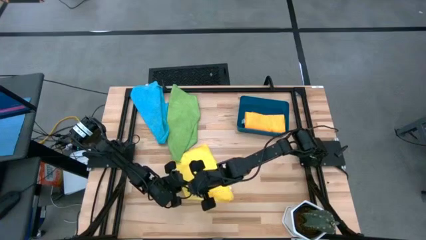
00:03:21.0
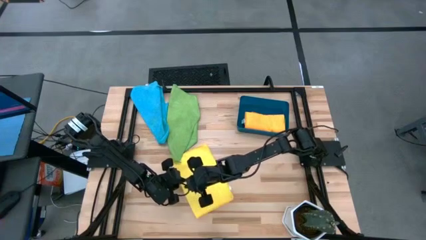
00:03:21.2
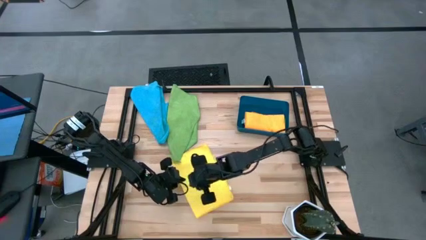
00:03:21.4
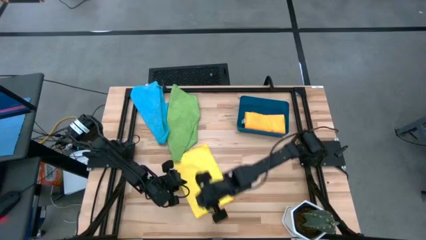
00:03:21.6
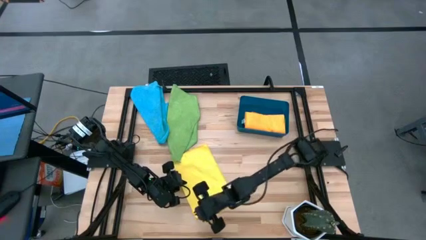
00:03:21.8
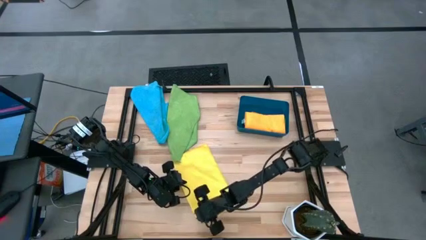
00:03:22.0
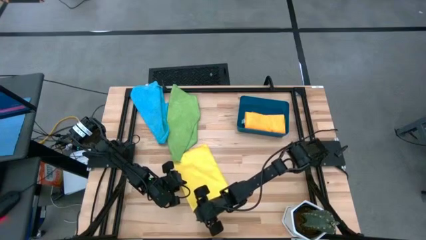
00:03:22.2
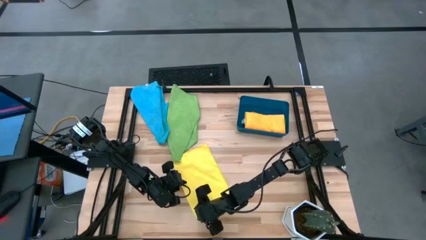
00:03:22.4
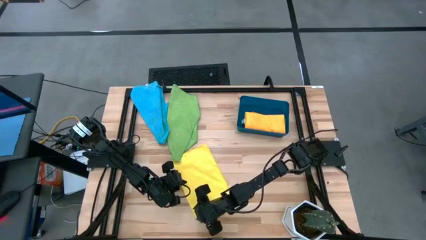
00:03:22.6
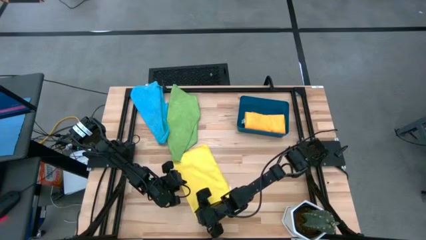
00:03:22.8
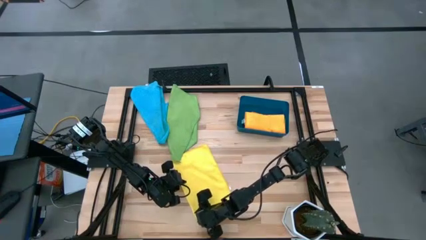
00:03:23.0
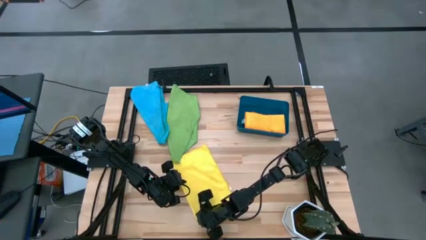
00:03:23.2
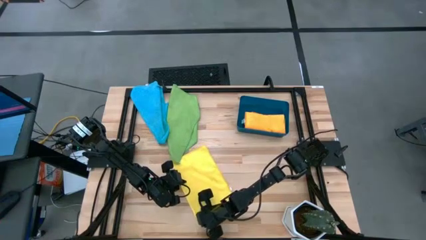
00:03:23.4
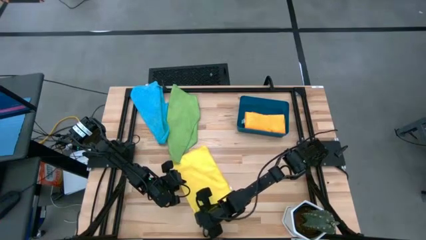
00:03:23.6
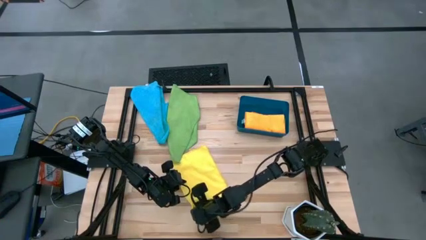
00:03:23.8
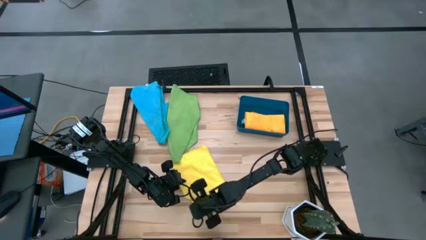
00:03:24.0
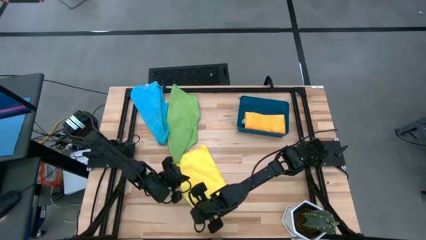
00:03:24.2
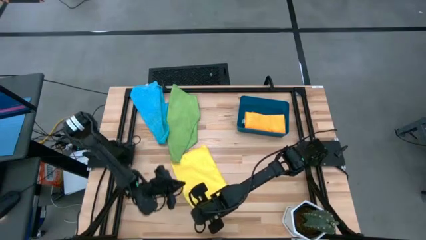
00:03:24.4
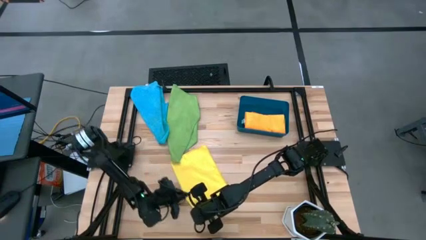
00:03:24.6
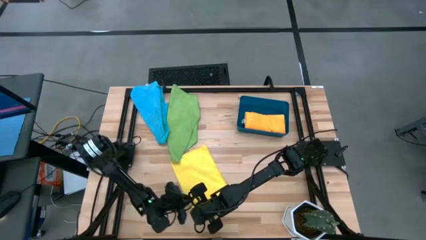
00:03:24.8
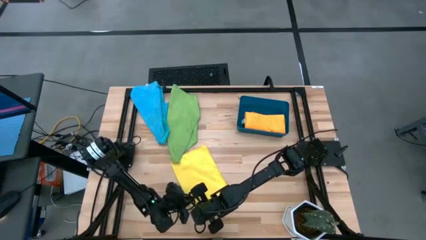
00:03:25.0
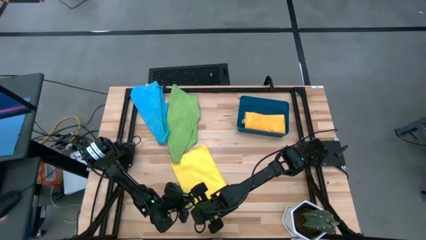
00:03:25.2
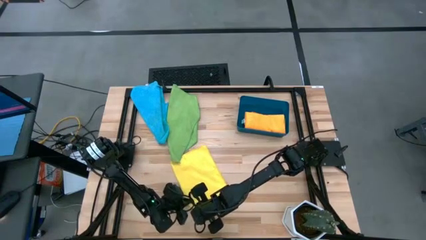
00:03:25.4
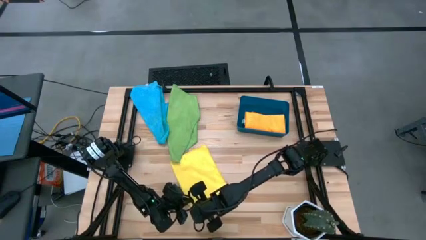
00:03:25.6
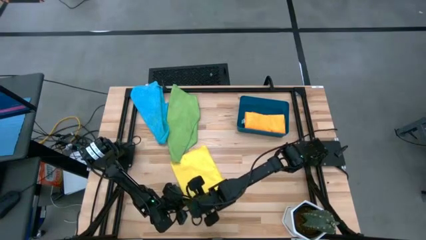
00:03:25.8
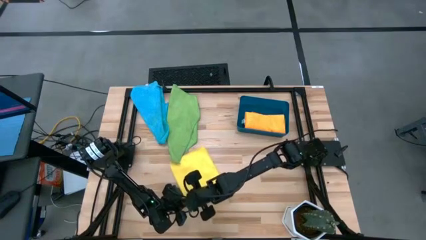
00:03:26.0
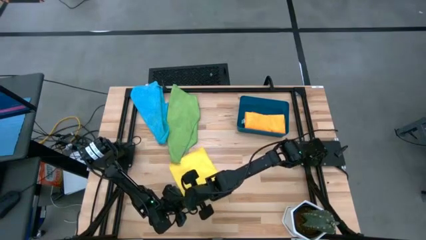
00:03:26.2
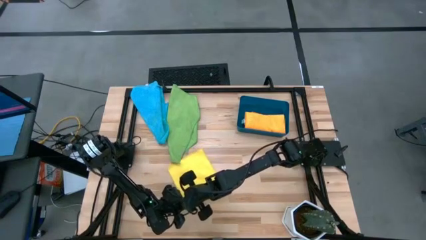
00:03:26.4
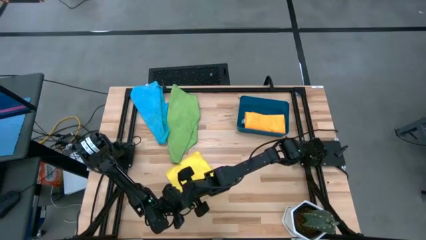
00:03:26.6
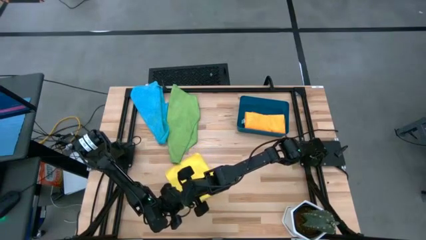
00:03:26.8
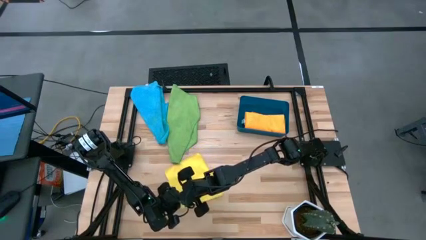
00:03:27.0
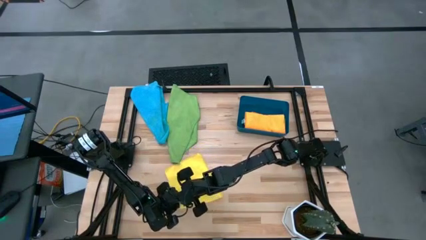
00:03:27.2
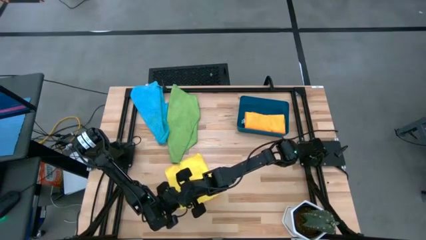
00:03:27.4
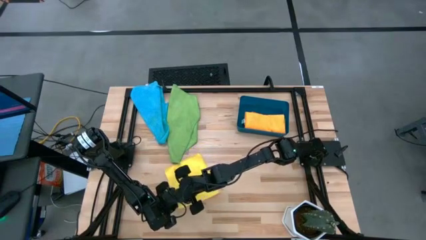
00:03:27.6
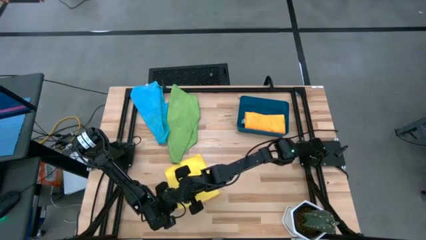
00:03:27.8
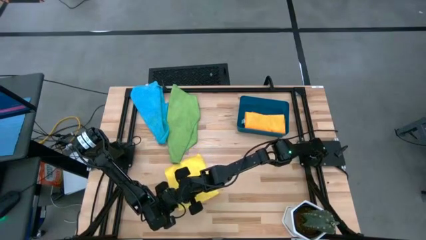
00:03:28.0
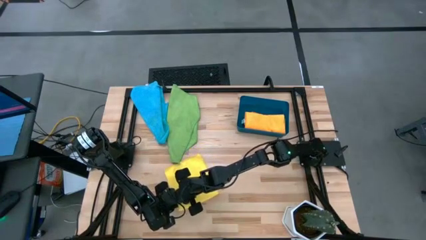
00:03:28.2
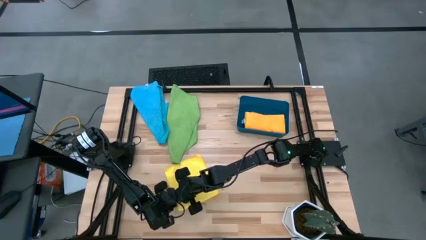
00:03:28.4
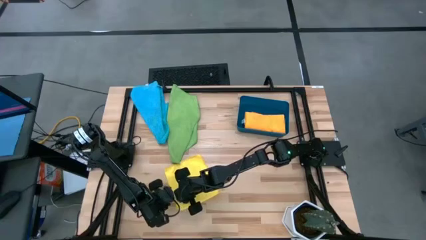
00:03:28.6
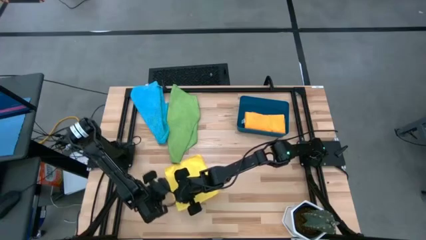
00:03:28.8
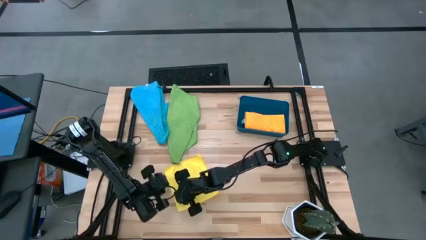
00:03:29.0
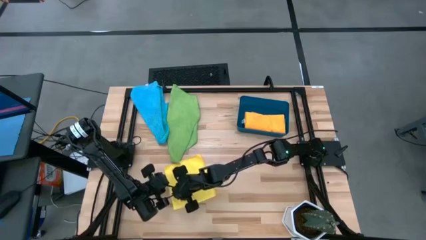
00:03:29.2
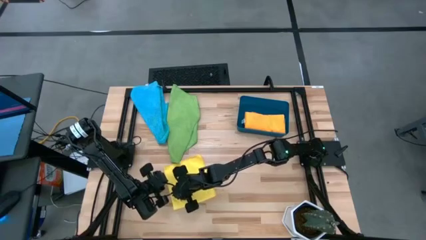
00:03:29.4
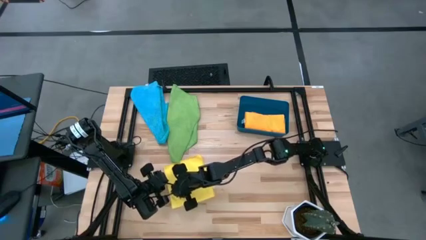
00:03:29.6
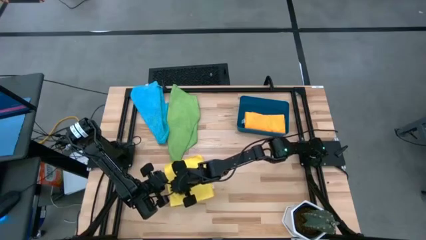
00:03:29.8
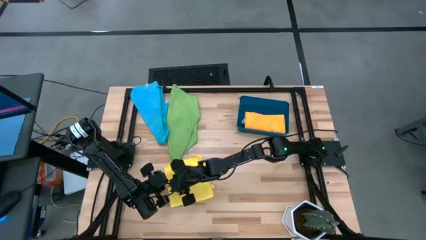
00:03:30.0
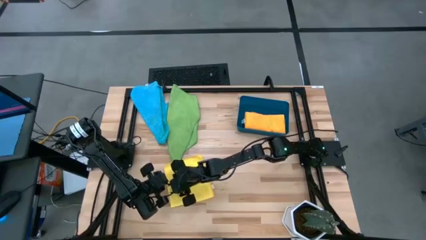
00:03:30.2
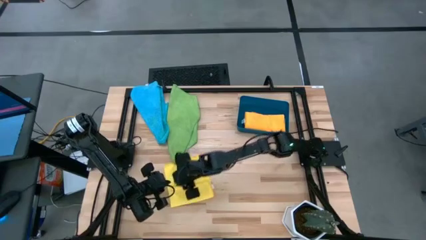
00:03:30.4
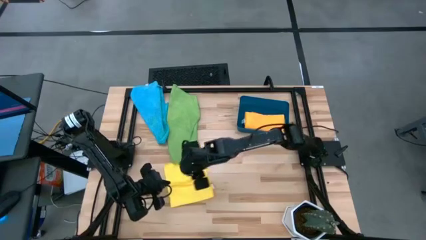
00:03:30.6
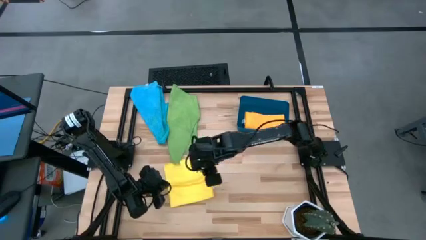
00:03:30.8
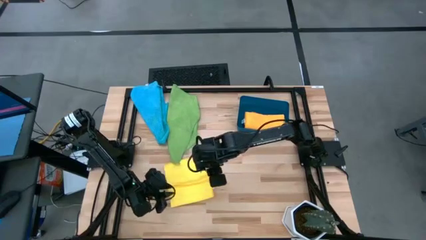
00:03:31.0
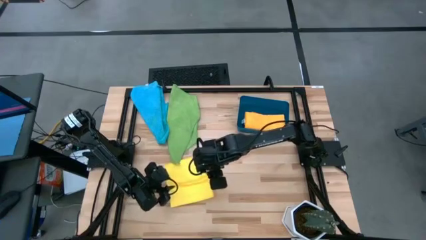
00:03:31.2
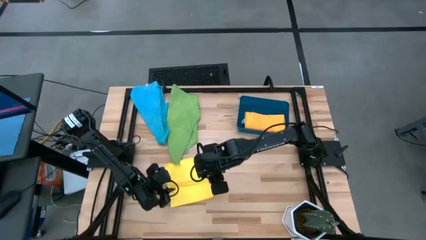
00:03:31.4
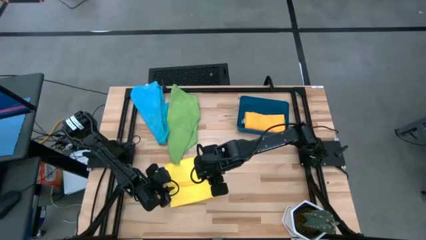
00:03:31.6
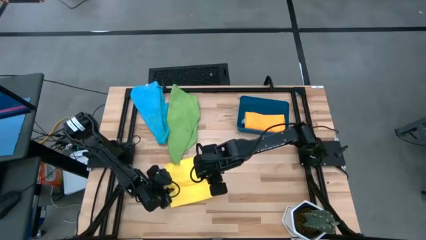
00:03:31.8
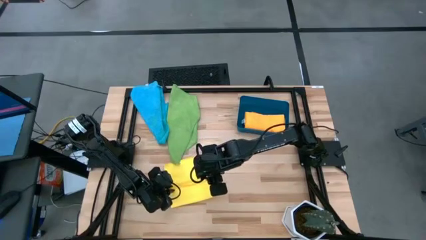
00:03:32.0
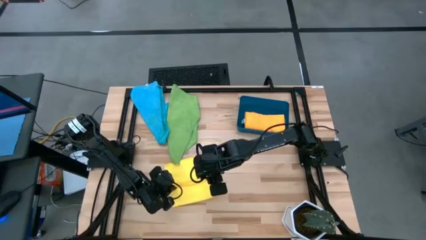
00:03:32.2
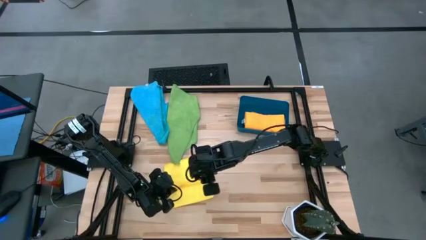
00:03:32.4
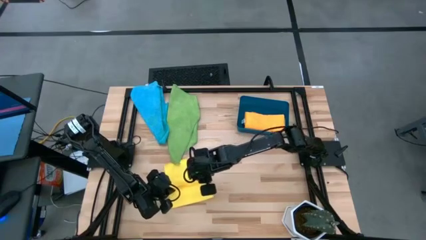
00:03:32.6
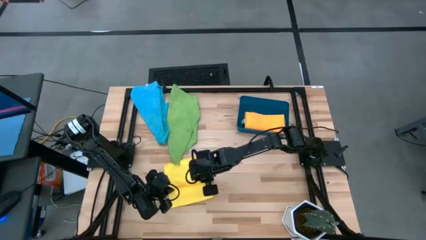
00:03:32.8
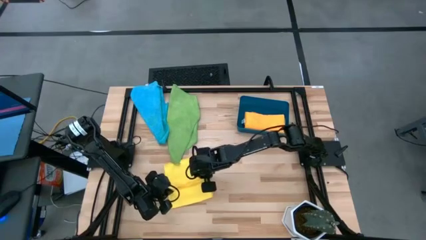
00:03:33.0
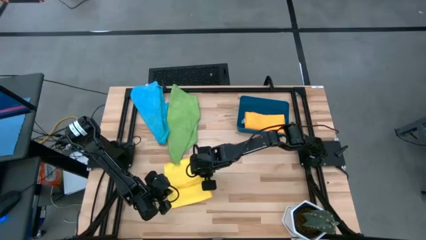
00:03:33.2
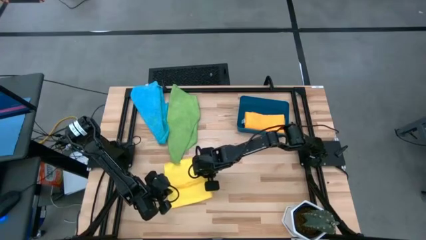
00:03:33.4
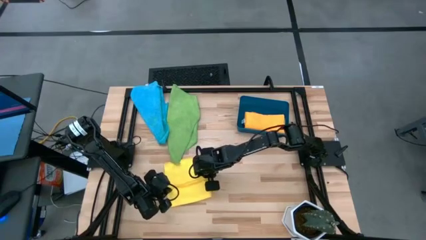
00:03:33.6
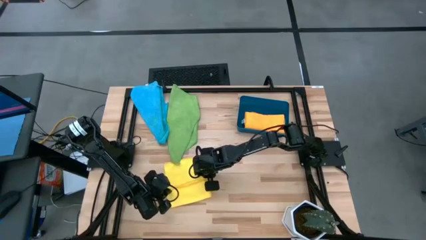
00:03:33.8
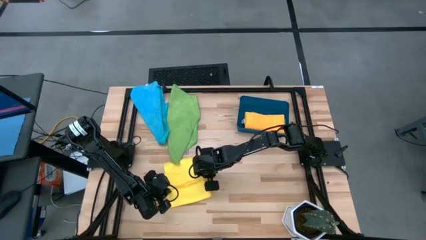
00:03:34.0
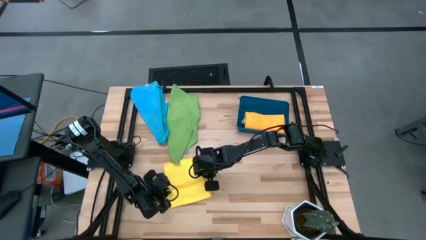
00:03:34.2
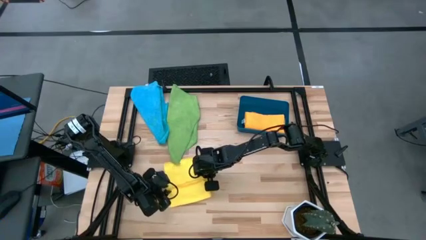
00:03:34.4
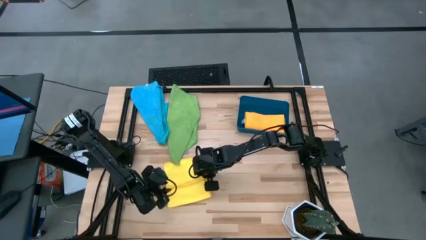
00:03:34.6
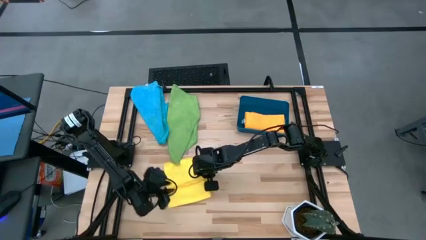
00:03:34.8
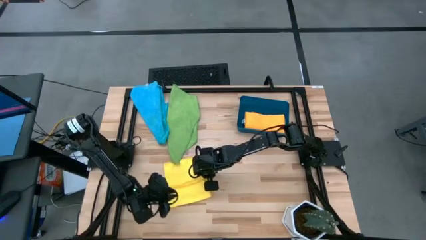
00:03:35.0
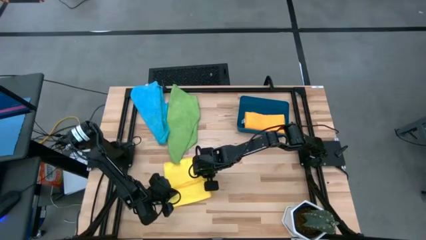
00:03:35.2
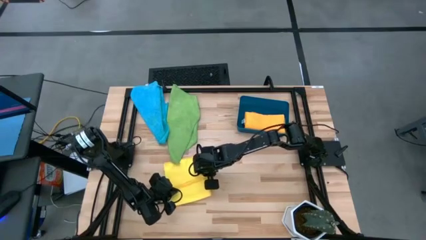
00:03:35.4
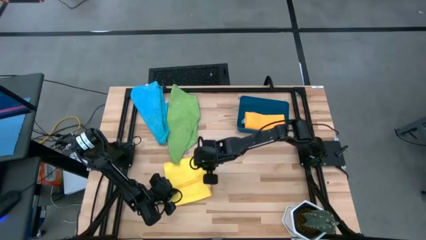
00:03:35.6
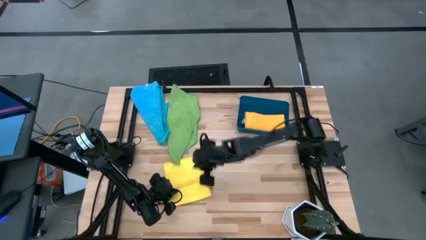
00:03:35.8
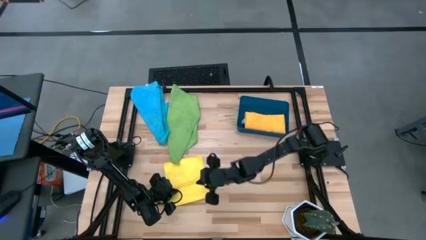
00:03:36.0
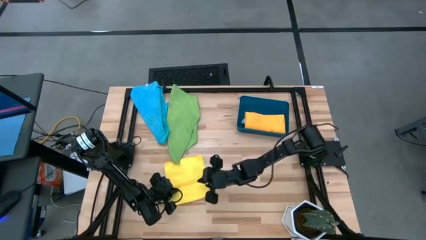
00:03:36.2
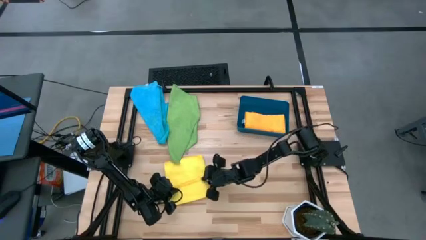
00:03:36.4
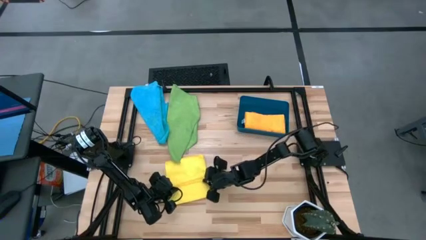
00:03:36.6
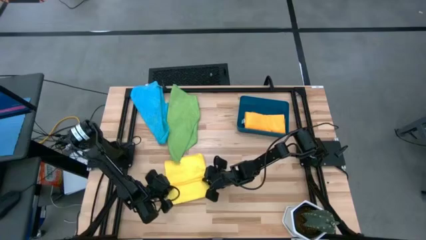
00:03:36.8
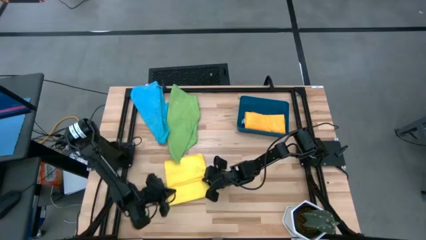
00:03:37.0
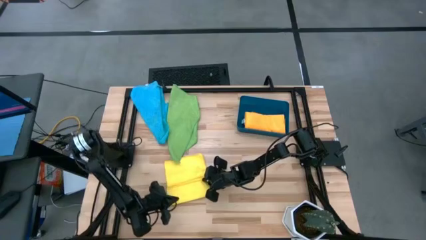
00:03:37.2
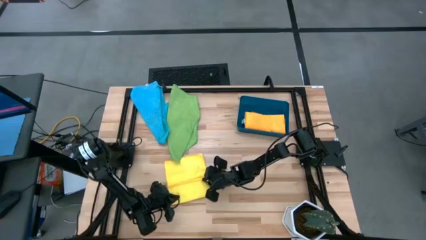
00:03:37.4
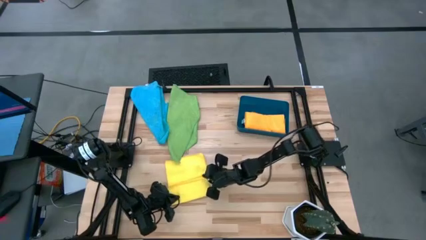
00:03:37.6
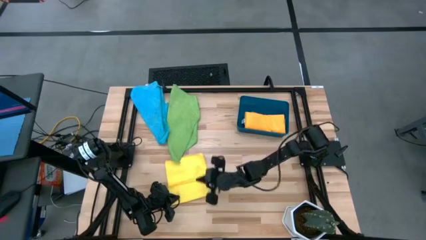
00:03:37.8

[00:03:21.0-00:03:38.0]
Task: Fold microfiber towels
Fold the yellow microfiber cloth
